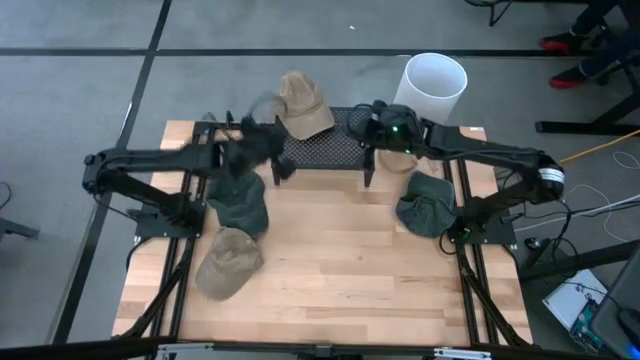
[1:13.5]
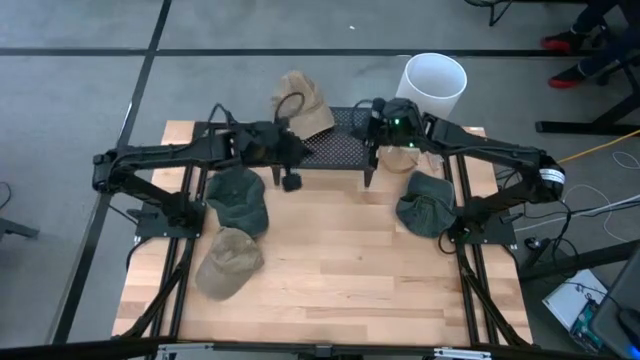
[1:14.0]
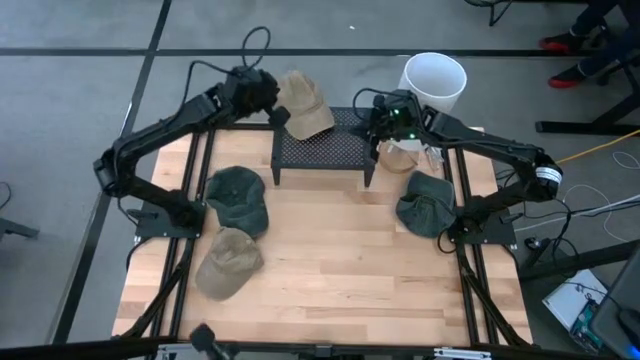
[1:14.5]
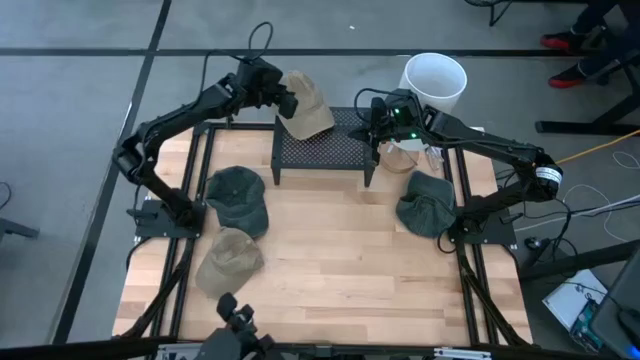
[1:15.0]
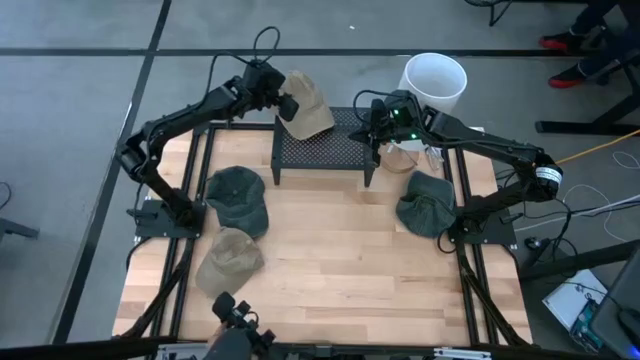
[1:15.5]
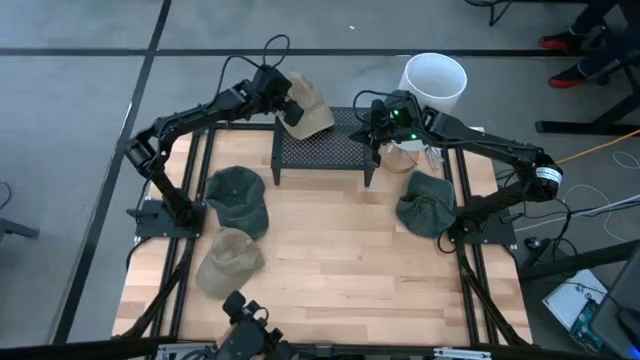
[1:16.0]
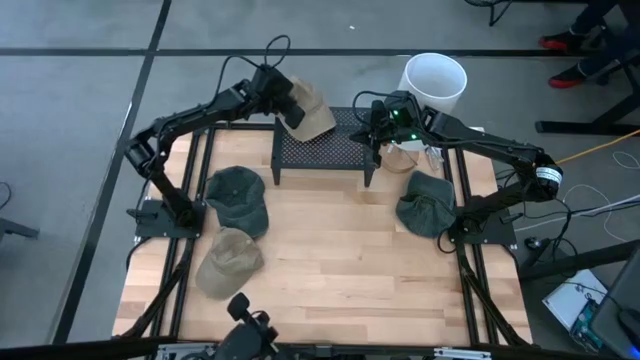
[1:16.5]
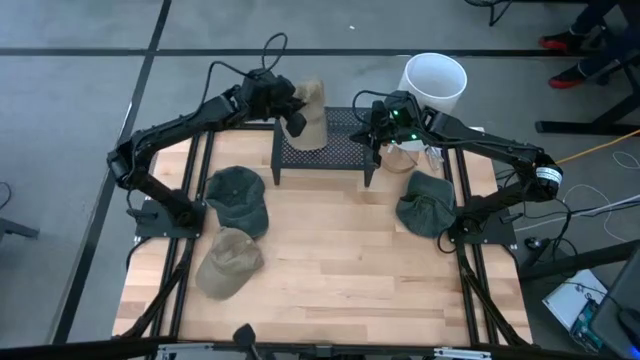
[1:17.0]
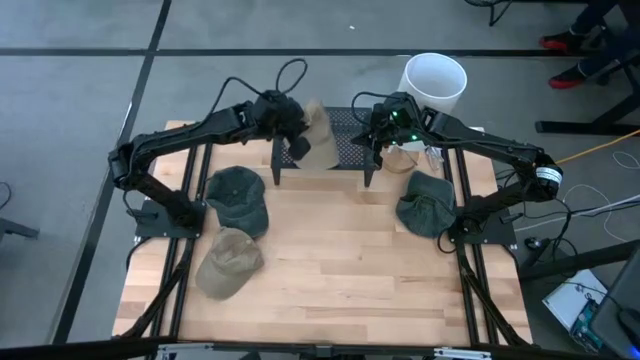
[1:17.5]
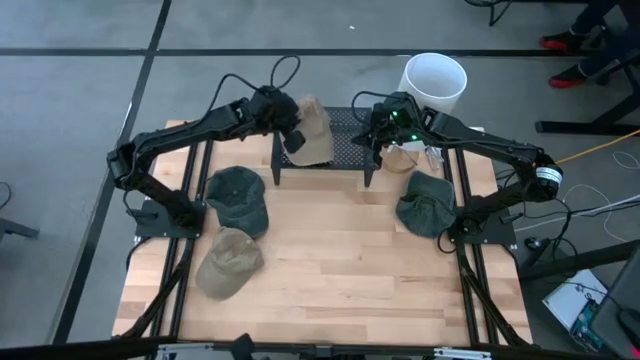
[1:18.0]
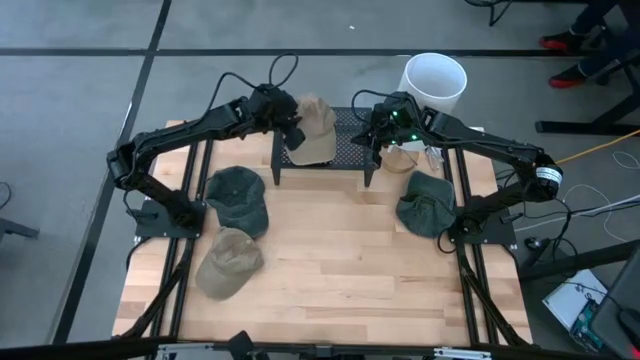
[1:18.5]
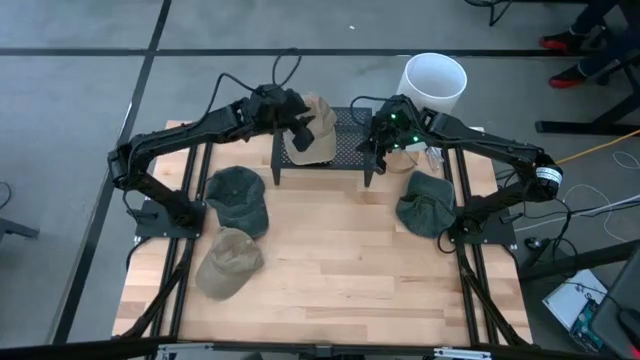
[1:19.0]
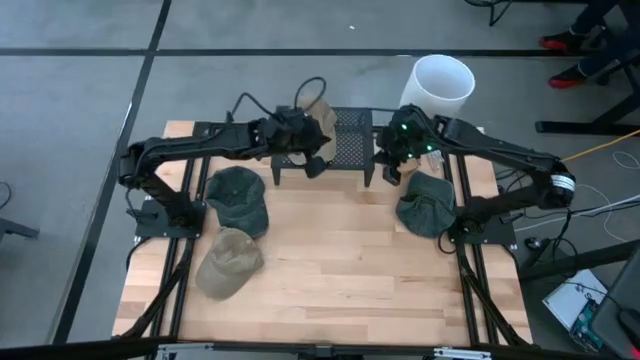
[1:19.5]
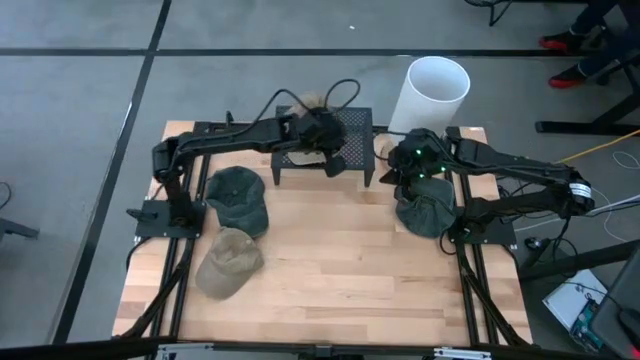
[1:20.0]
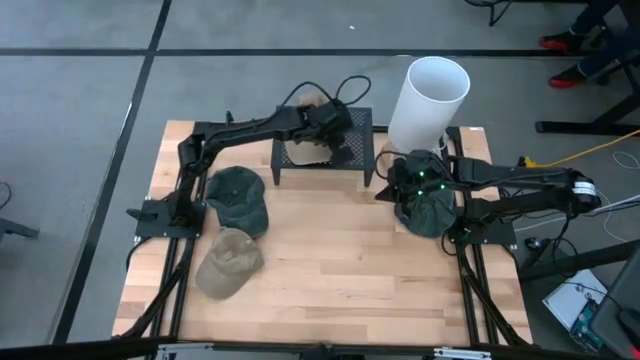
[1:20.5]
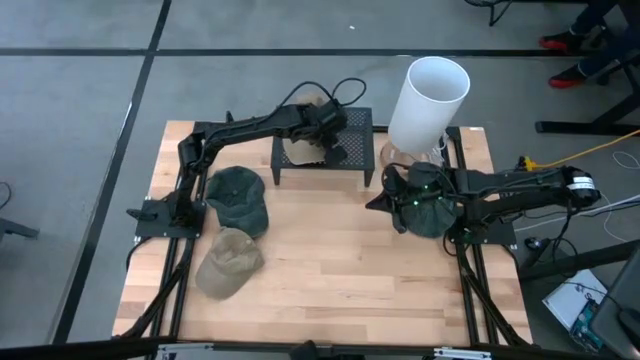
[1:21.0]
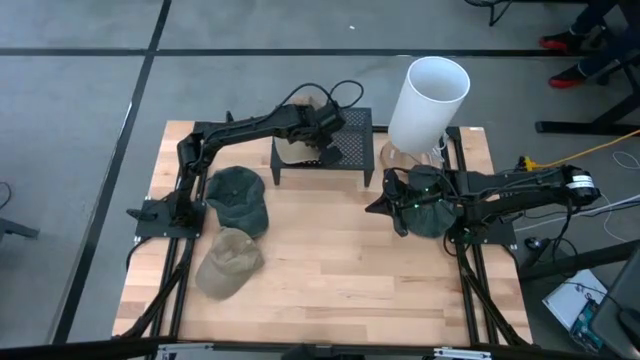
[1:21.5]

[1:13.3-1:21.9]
Task: Pick & Place hat
Put the right brown cap on the shelf

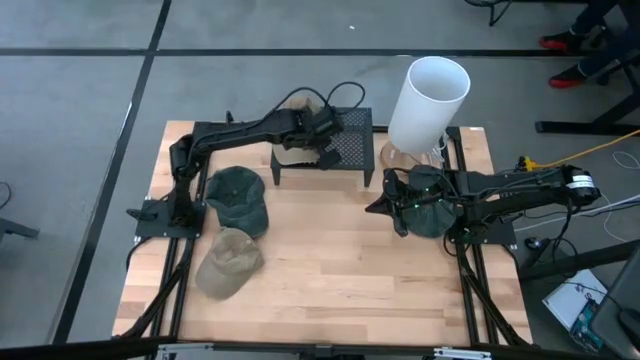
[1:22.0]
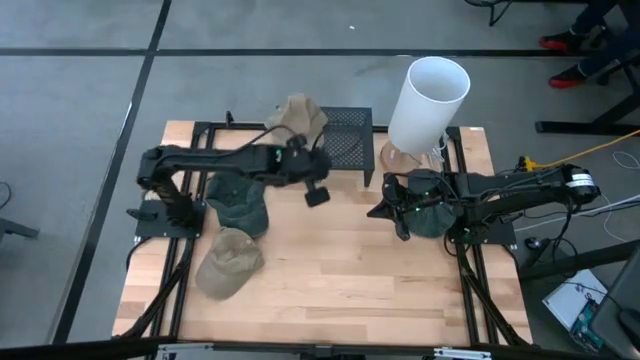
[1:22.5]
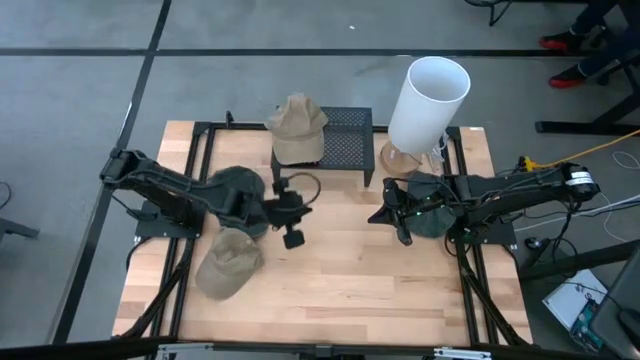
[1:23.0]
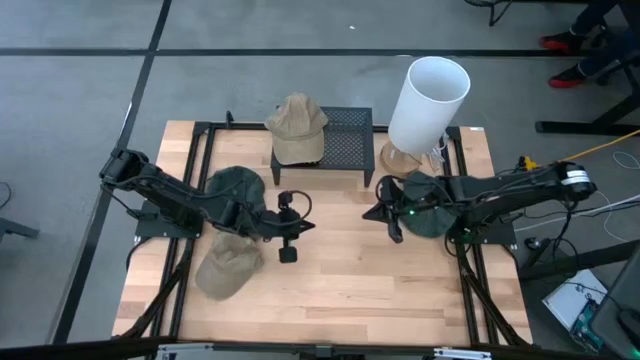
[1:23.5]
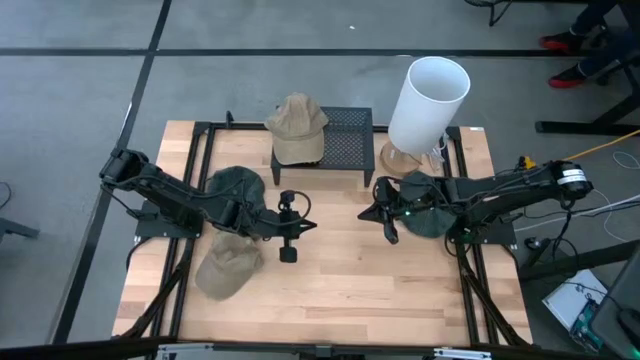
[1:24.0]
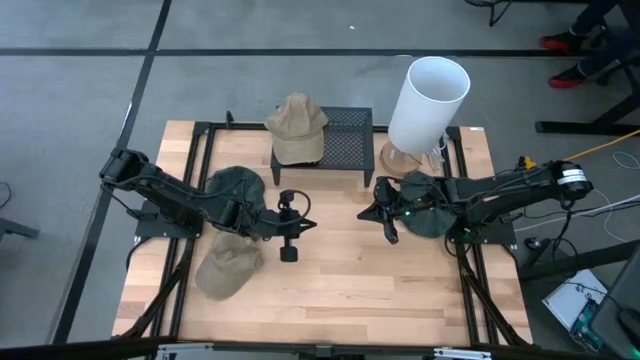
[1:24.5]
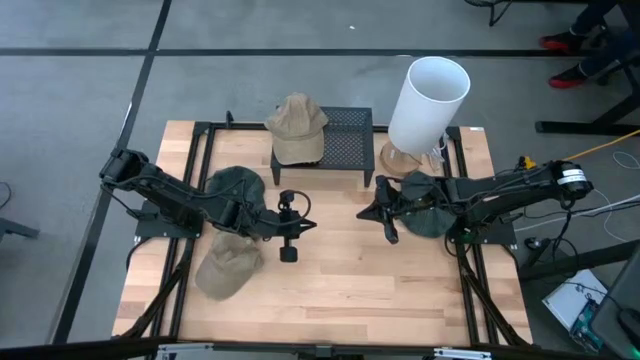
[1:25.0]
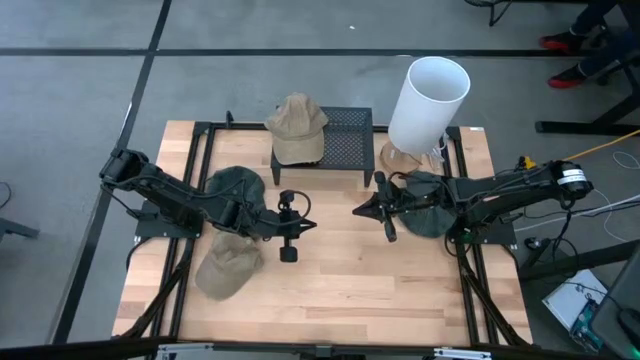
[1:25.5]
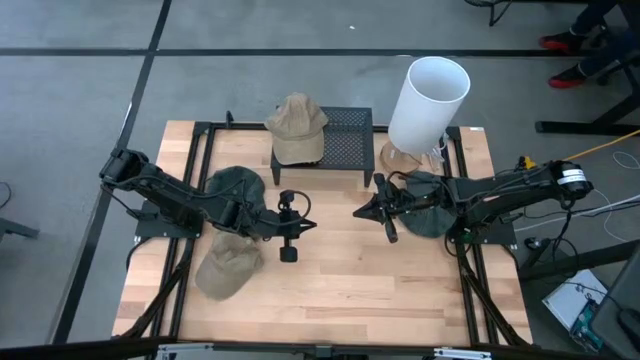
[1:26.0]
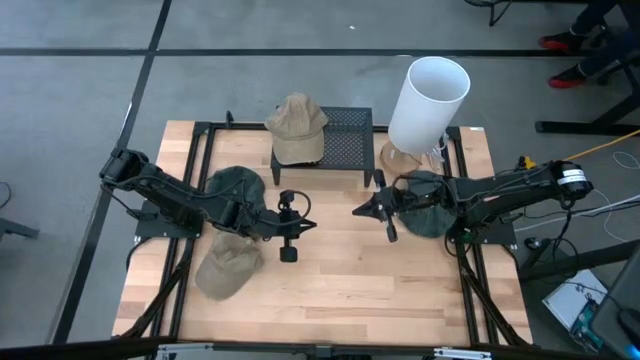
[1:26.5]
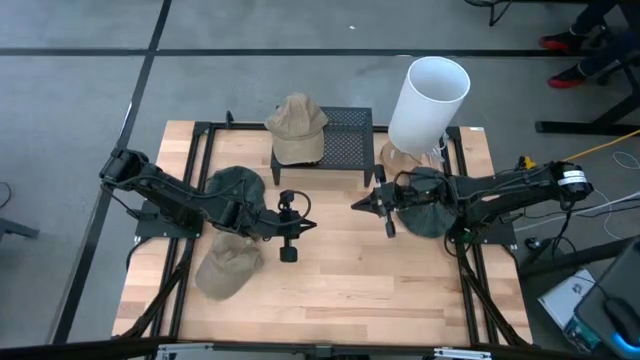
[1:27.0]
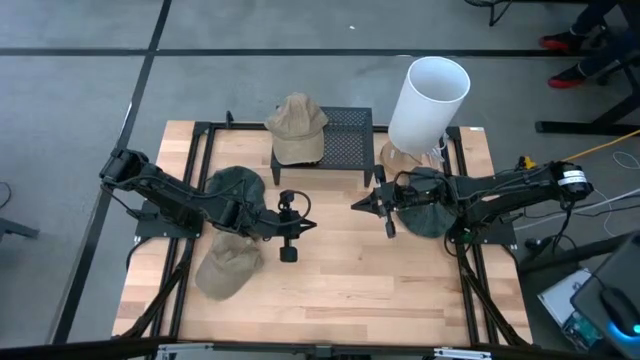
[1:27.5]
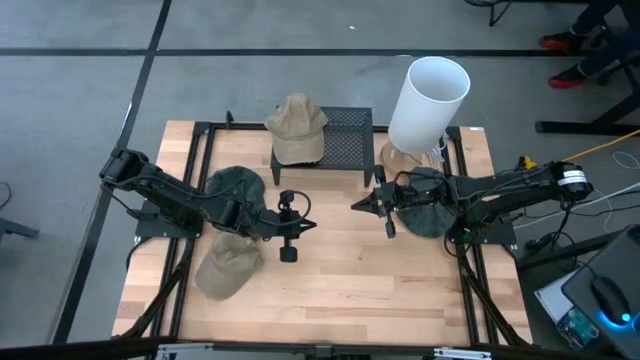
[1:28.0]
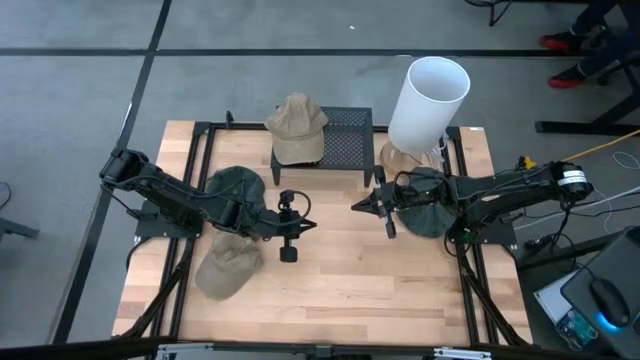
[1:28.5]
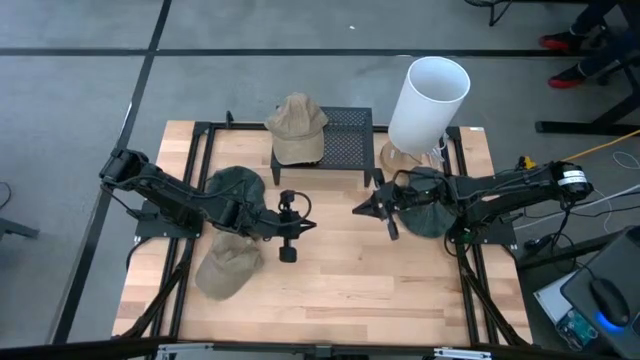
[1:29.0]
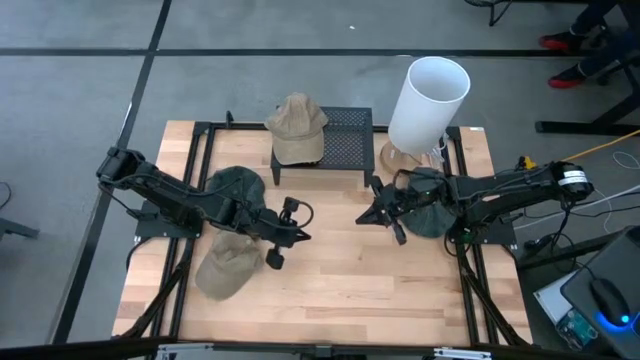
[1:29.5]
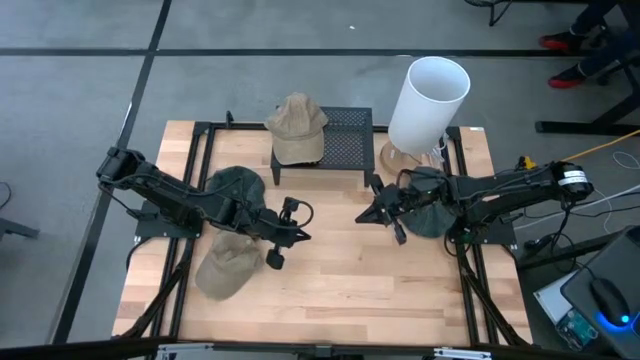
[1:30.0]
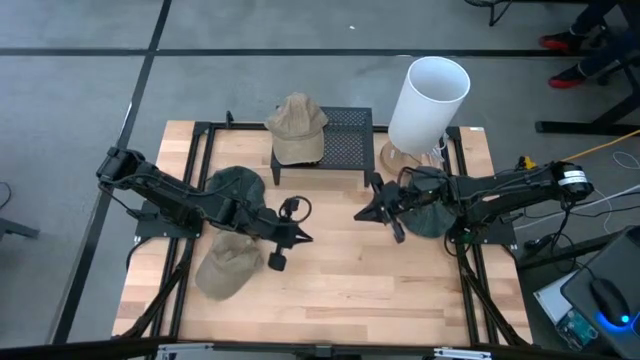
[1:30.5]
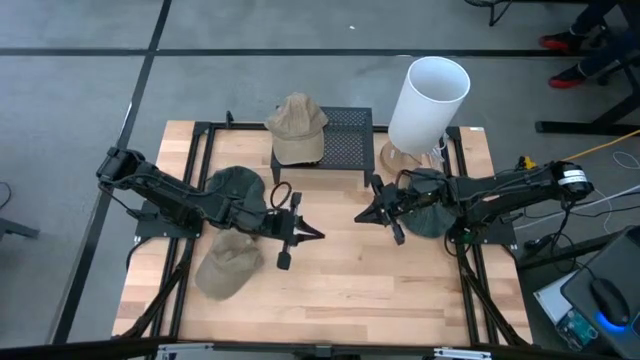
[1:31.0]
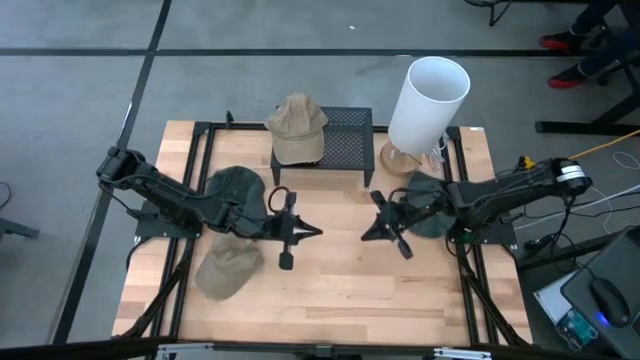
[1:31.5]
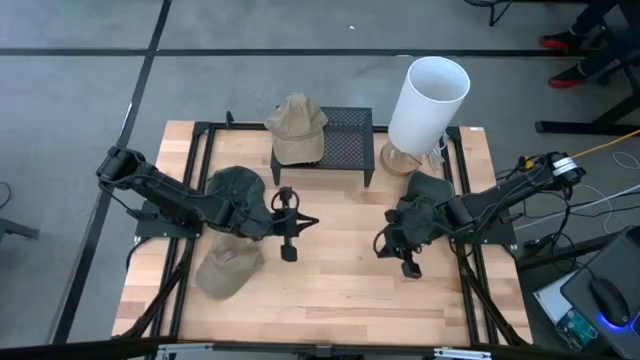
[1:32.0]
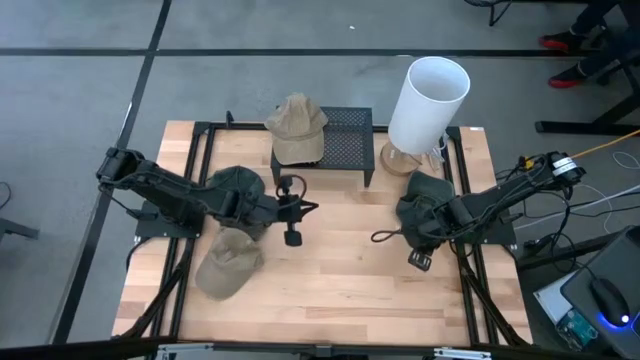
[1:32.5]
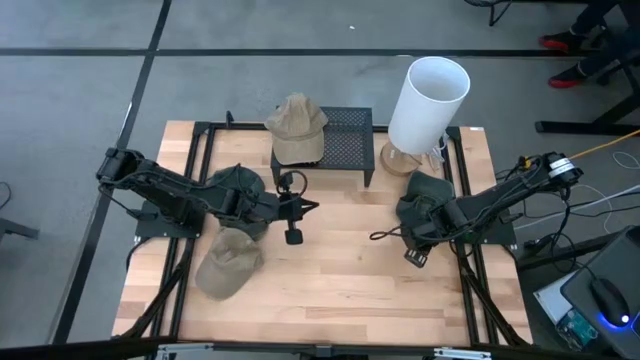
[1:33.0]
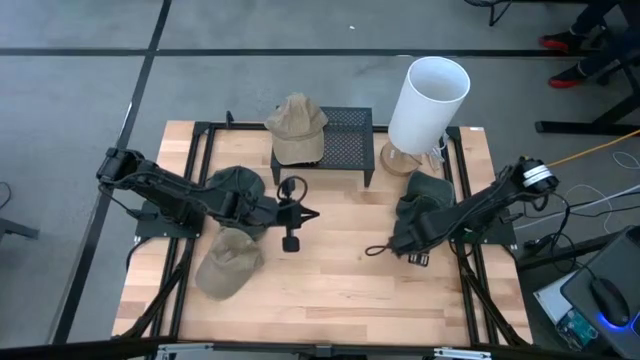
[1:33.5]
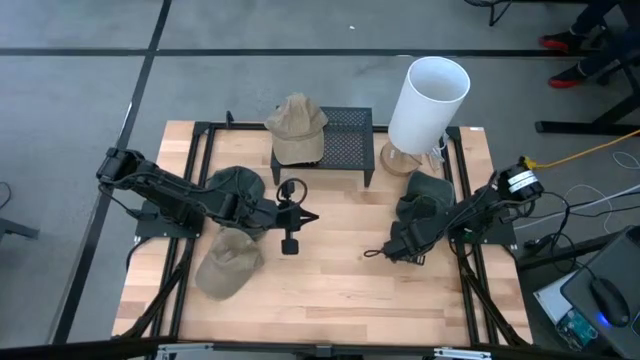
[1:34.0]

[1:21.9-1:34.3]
Put the right dark green cap on the shelf

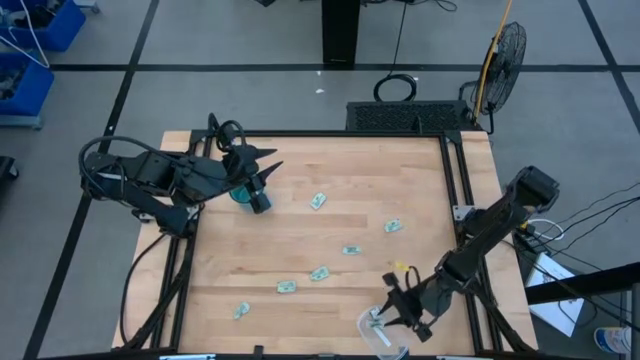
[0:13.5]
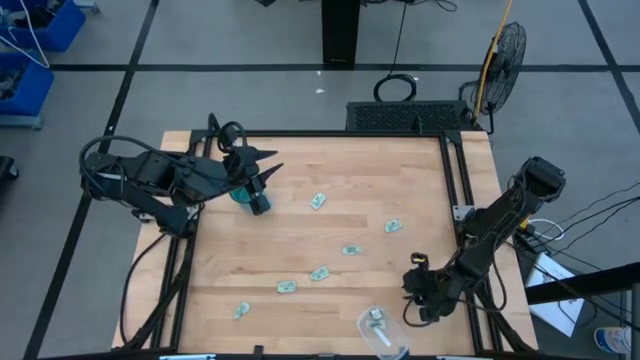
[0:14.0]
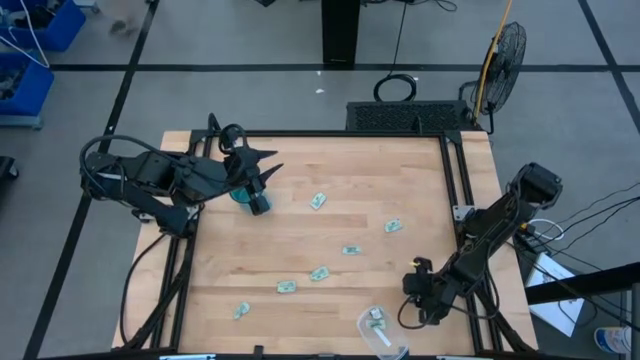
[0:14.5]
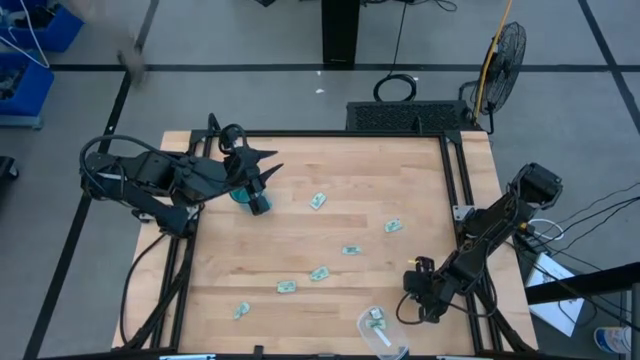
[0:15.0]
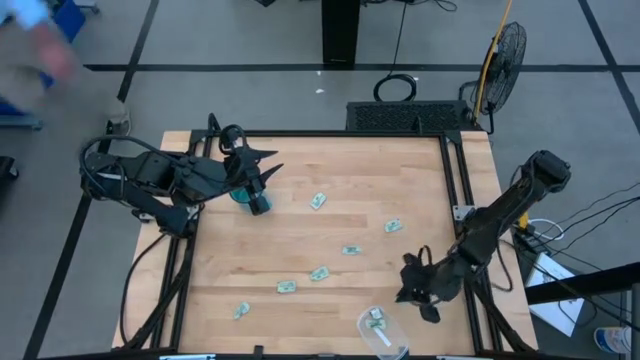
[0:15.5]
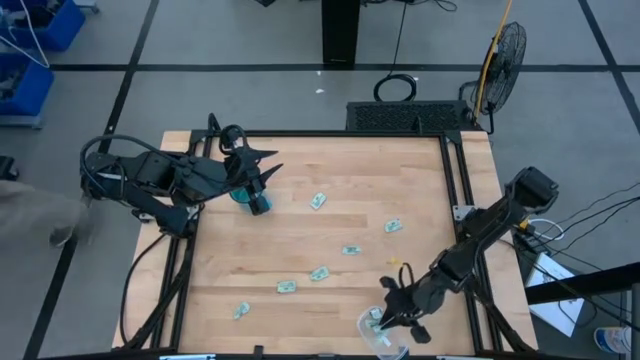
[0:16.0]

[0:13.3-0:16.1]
Task: Pick and place Stevia / Truvia into bins
Put the green stevia packet into the transparent container
